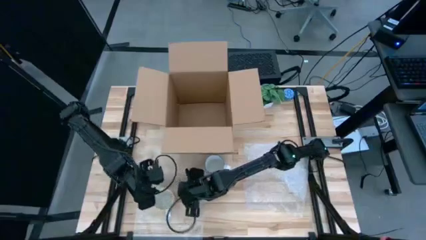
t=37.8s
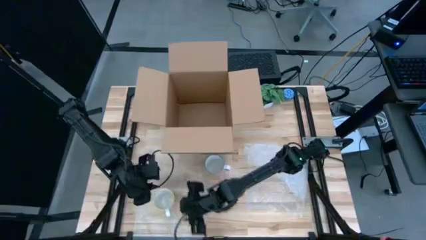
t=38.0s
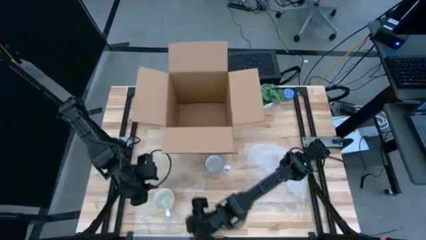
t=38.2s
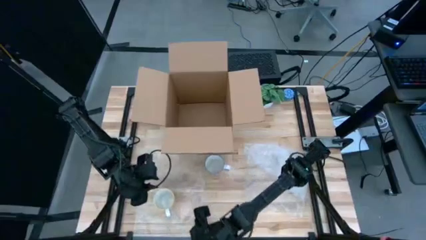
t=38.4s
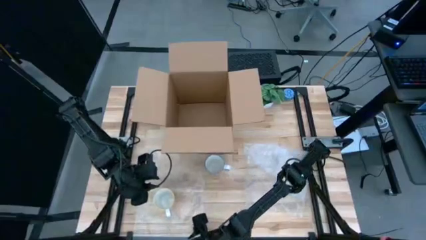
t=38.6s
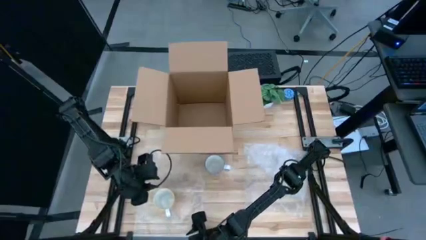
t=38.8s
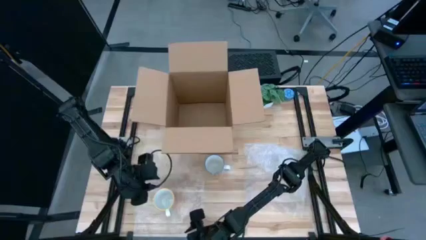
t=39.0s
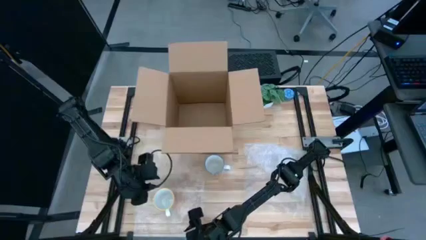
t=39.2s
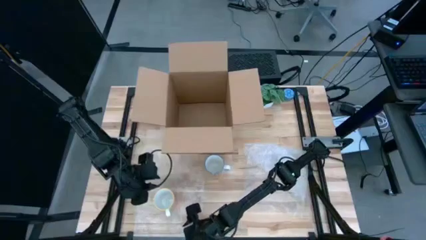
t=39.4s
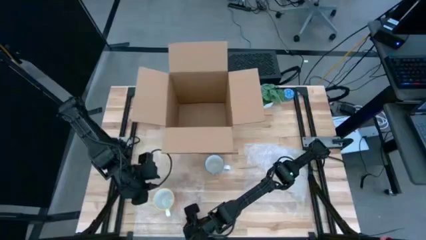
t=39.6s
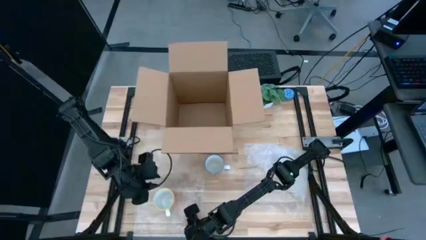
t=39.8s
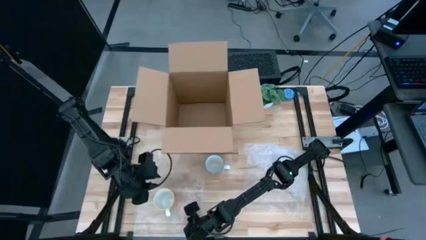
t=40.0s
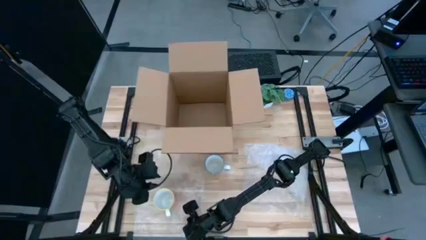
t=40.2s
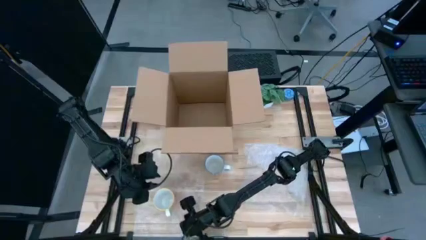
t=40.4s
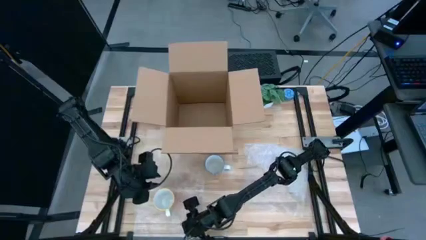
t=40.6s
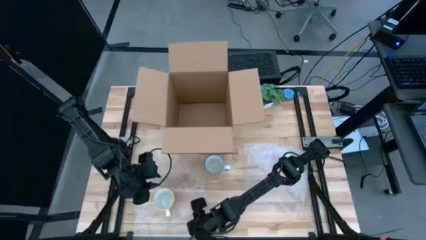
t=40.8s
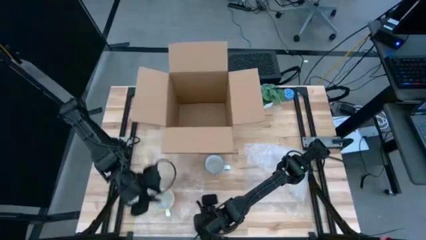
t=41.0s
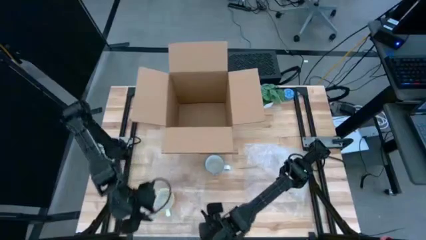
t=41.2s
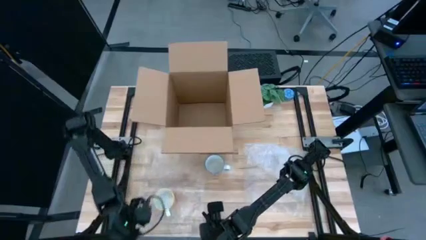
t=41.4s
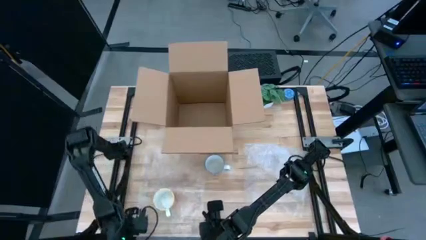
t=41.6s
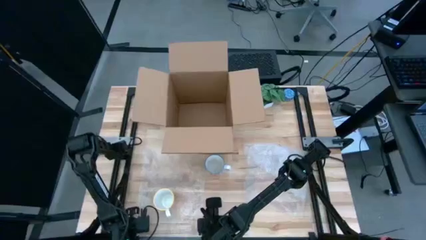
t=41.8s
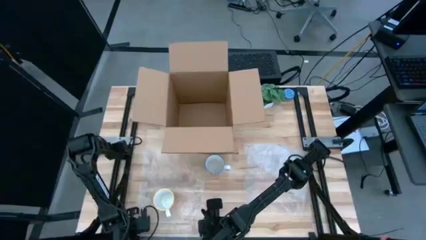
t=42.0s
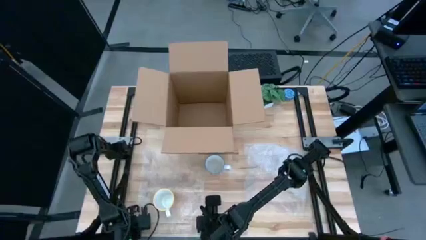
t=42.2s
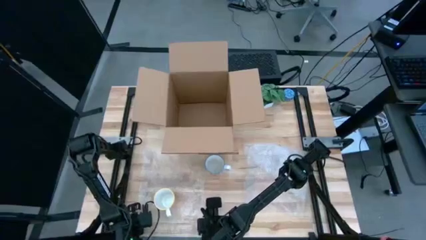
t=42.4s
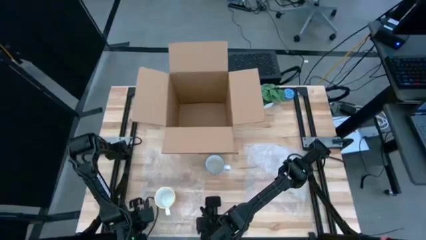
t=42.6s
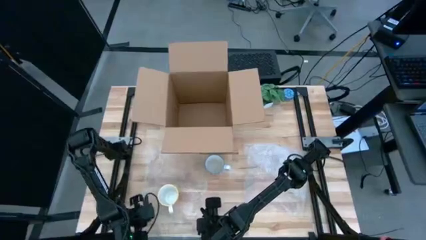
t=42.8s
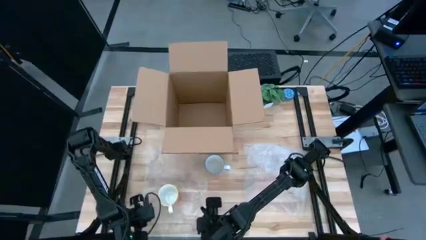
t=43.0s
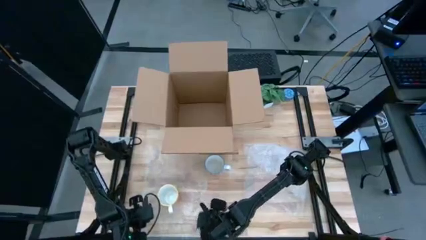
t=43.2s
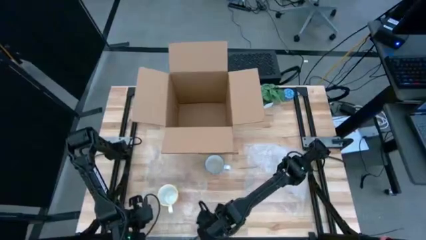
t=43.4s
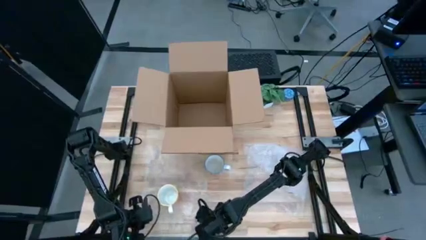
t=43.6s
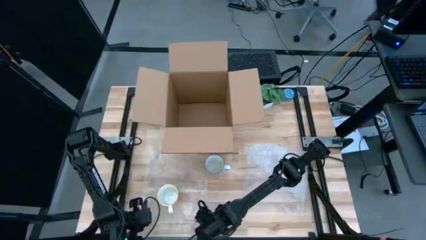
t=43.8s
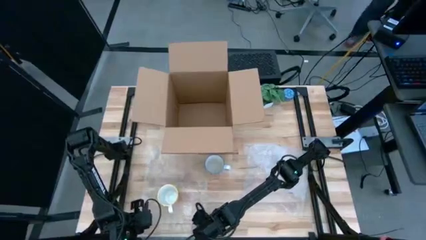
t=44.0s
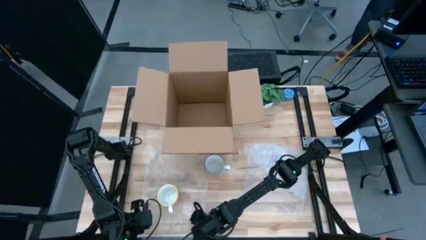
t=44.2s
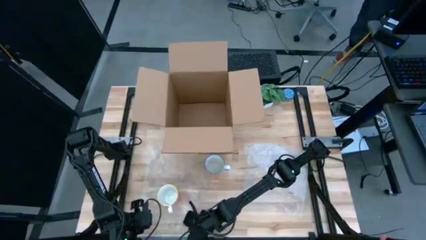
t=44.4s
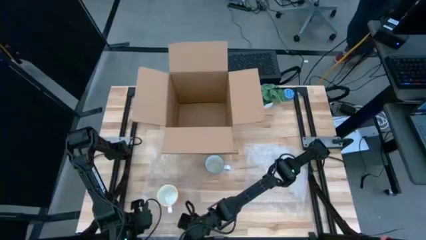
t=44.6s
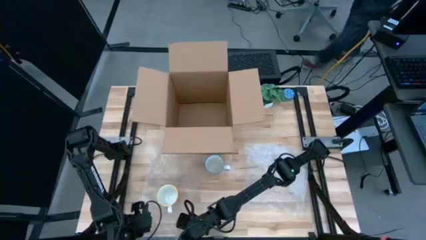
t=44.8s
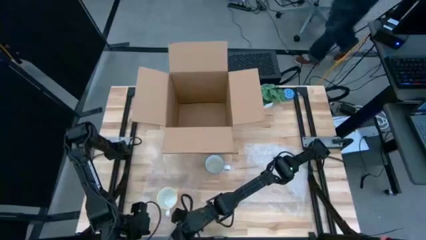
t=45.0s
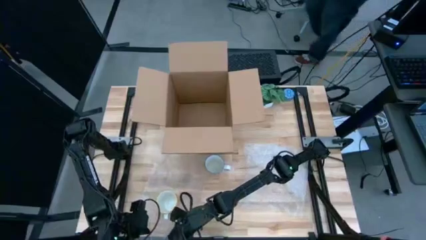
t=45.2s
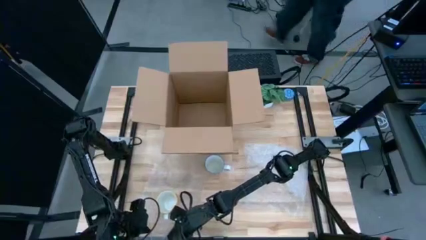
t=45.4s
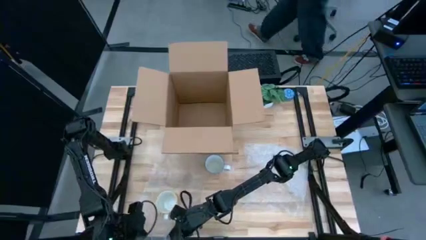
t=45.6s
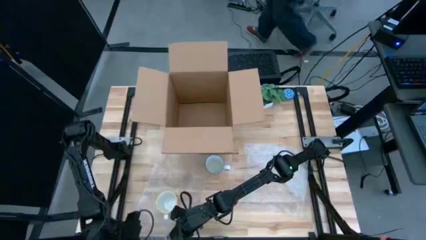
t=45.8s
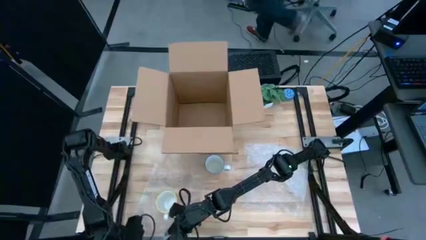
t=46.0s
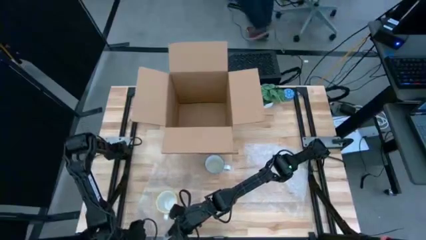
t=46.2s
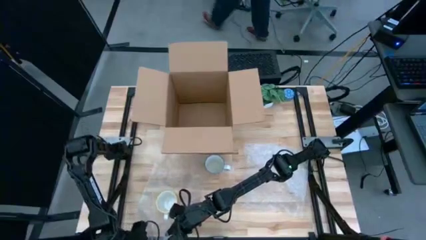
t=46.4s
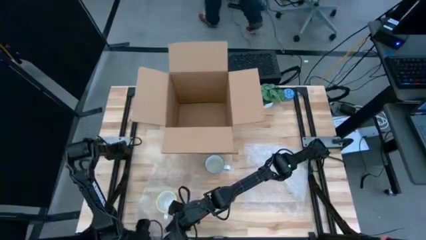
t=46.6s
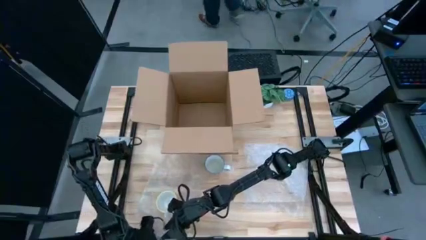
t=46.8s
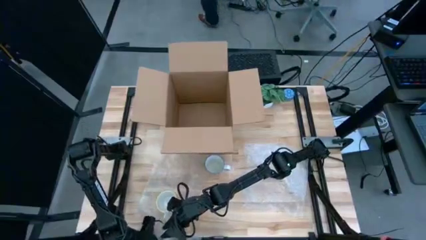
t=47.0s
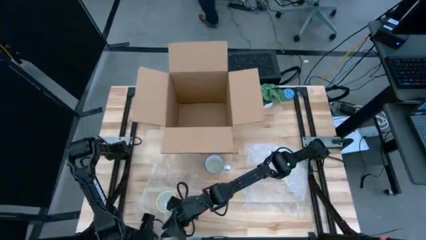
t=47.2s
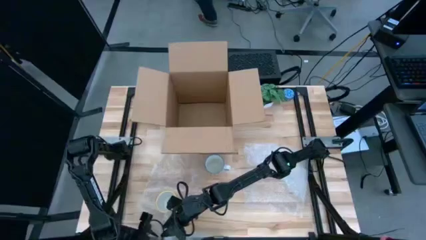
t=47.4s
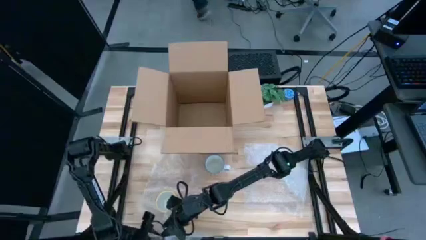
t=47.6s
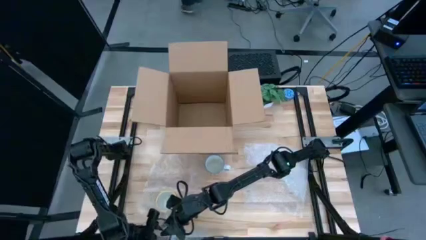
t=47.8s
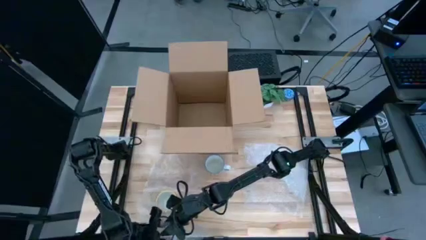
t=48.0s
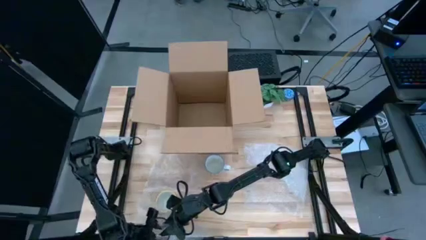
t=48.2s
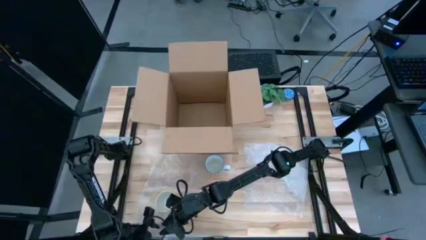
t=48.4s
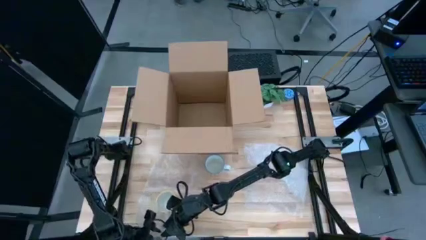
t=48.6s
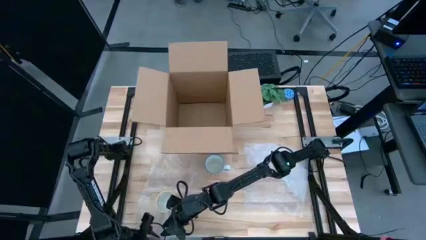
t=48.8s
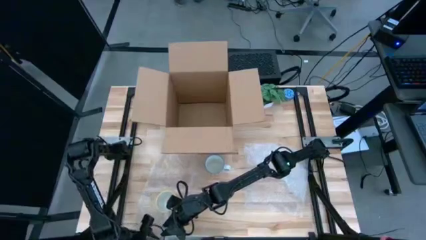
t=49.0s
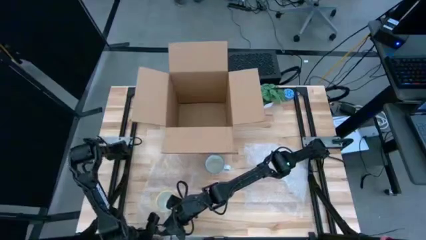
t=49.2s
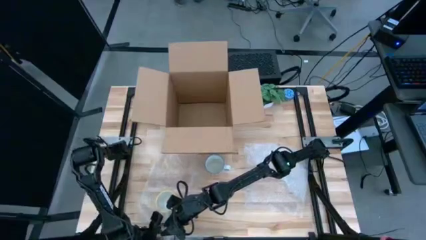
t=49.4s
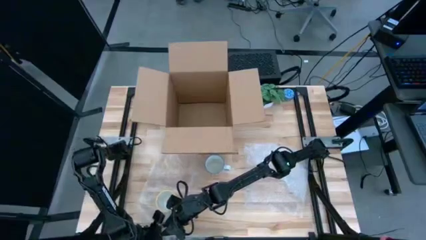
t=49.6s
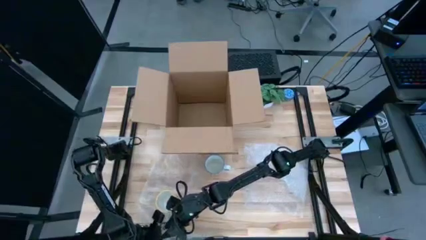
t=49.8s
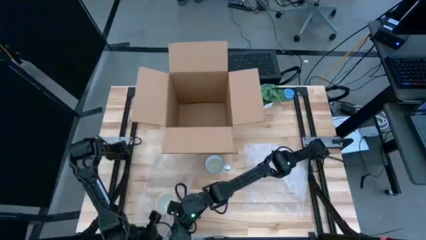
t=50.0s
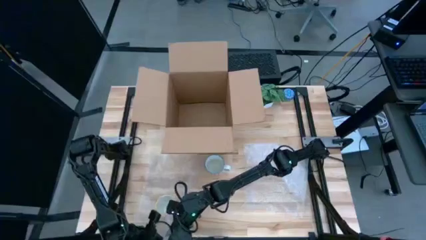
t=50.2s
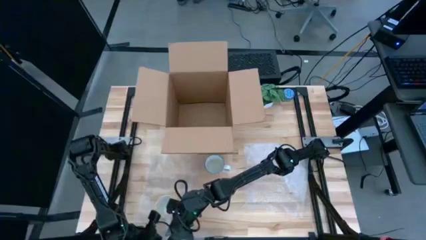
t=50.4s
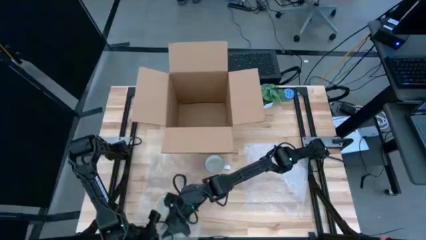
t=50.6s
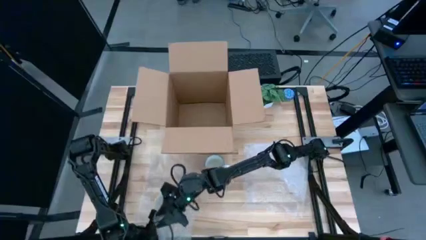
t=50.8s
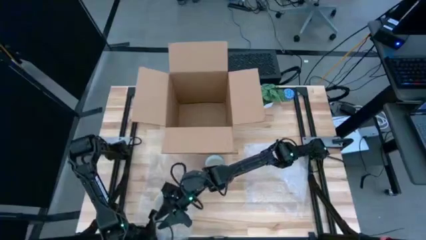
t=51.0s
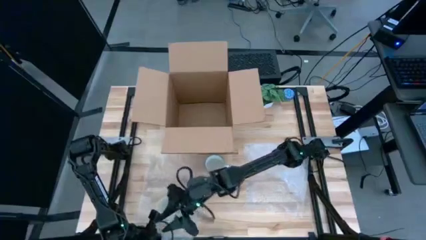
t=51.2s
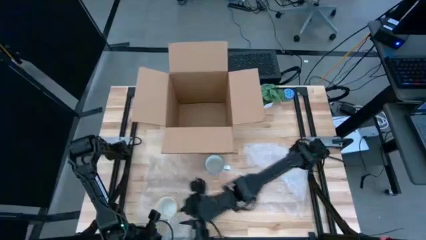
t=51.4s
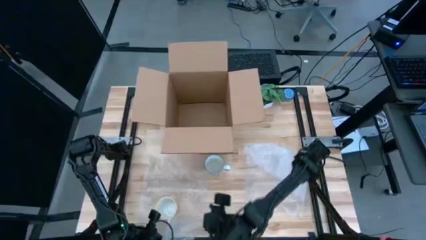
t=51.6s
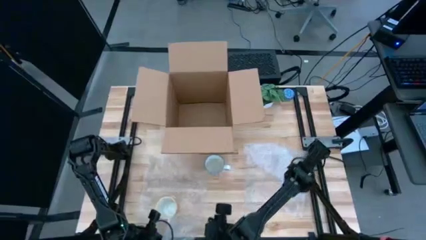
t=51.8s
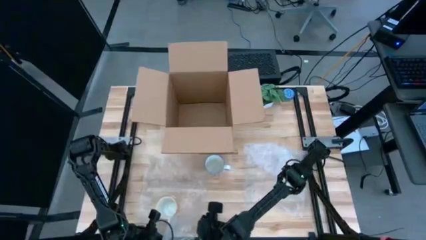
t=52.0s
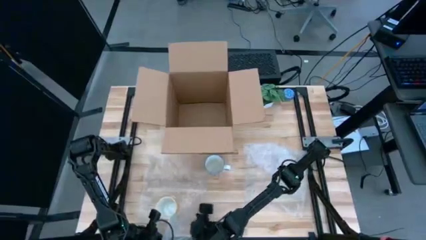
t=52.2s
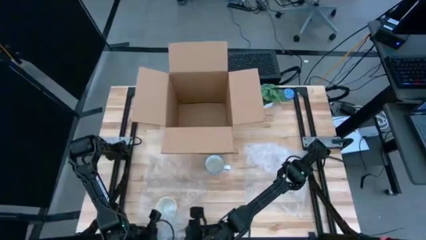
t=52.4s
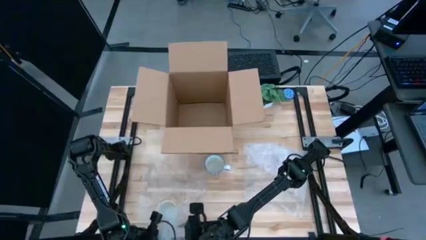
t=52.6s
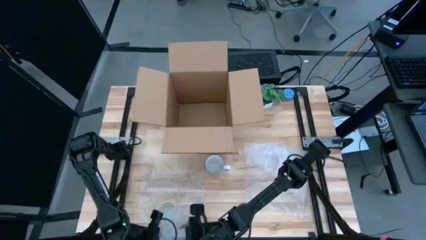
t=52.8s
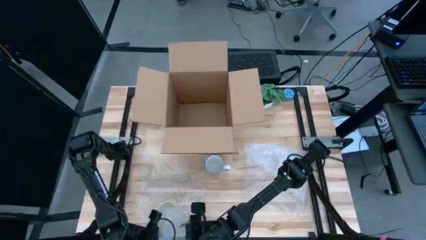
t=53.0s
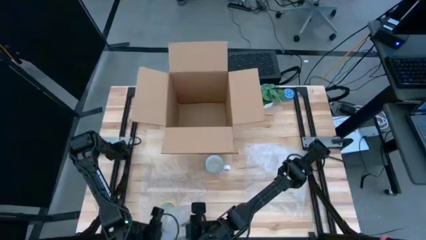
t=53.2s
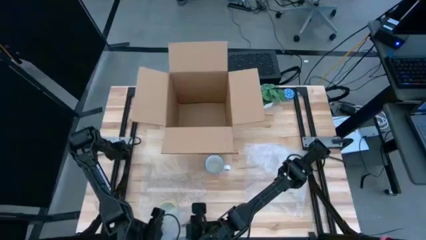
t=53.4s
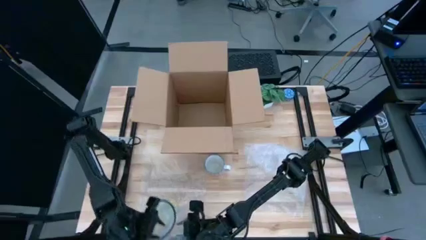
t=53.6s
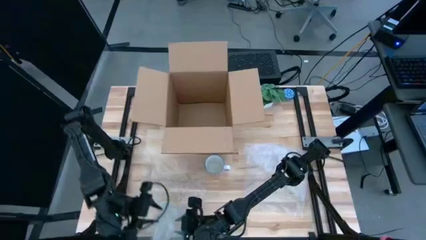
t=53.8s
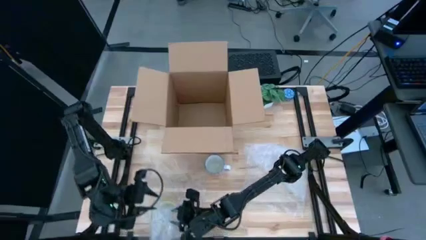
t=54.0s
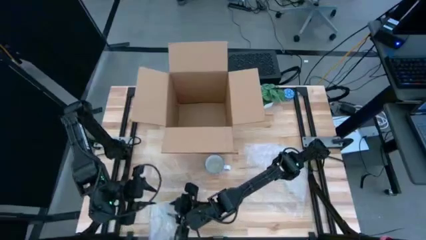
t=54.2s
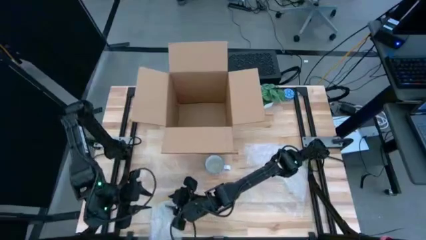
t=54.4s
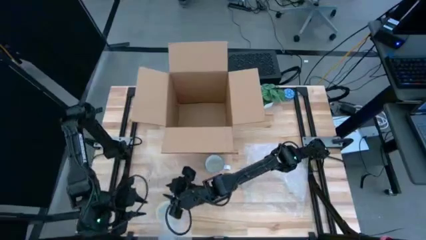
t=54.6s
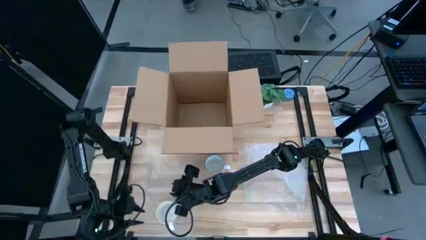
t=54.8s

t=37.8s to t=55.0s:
Task: wrap mug
Wrap the yellow mug with bubble wrap

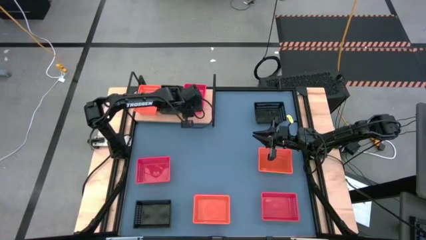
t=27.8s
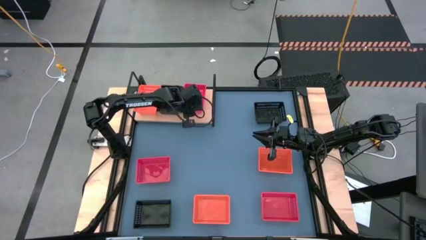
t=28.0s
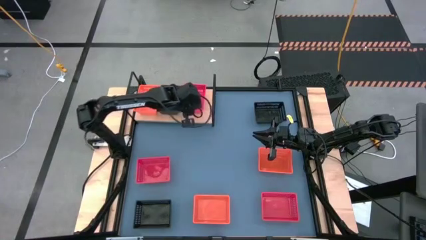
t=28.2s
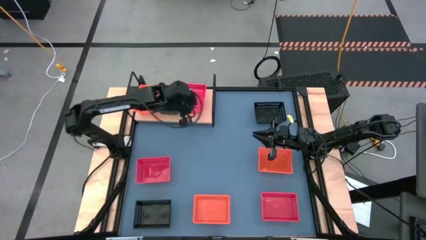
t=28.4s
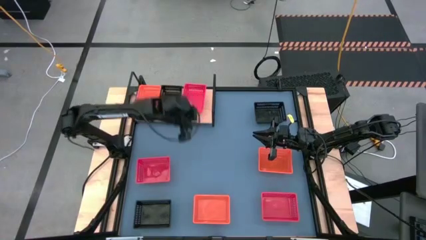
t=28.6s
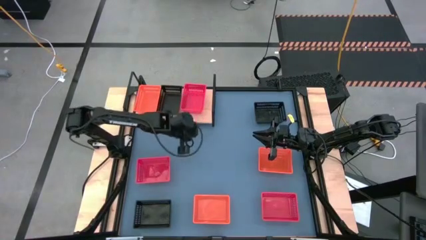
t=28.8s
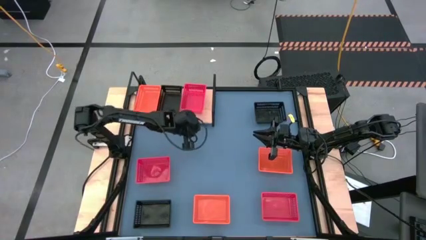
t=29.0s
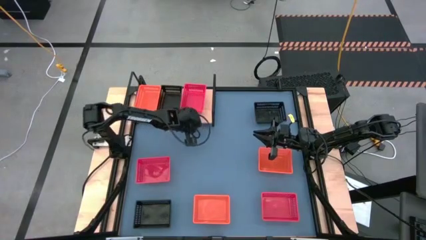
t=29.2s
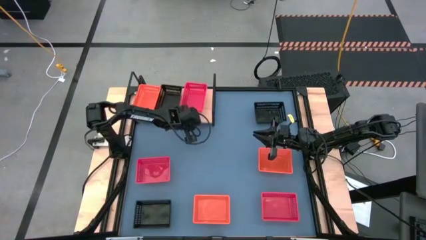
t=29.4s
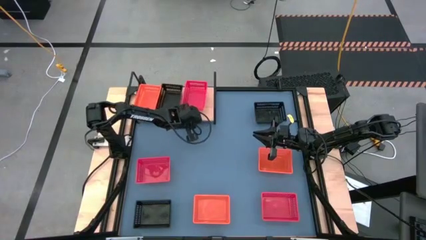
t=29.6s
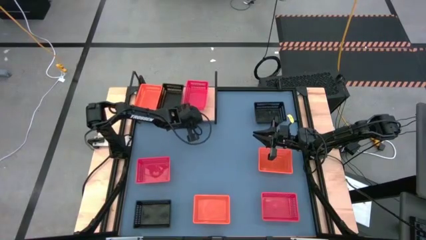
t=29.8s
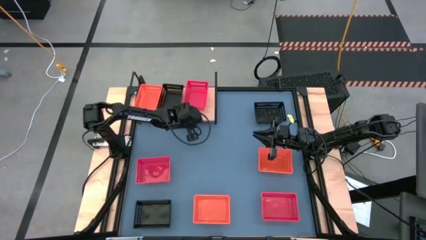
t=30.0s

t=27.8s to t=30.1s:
Task: Stack baskets on shelf by color
Adjust the shelf
